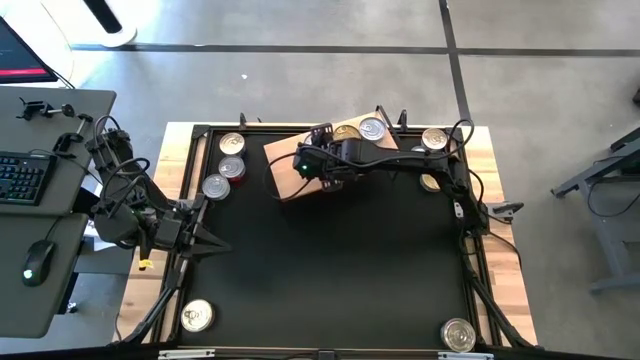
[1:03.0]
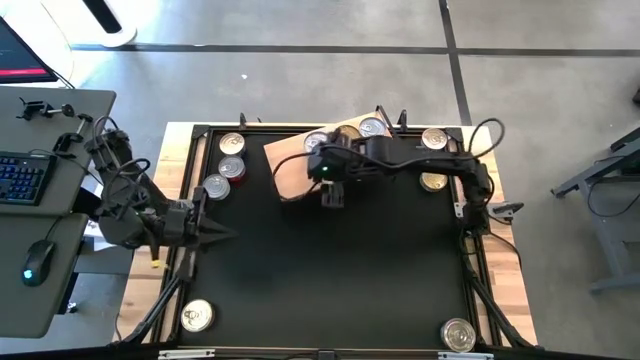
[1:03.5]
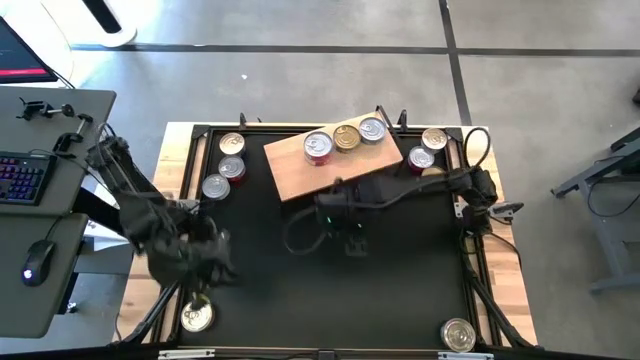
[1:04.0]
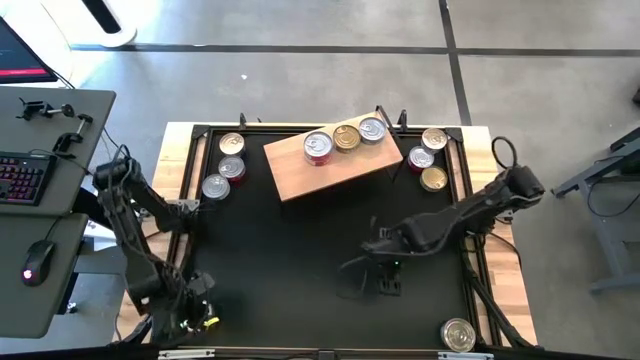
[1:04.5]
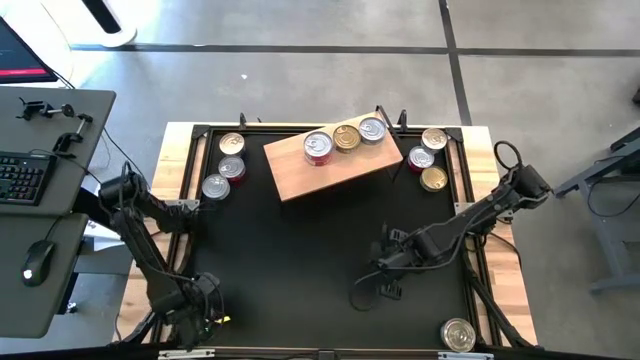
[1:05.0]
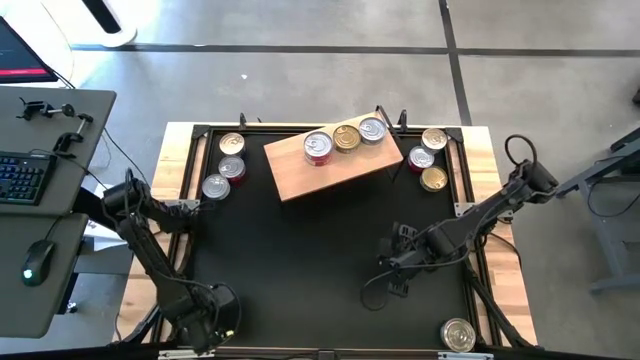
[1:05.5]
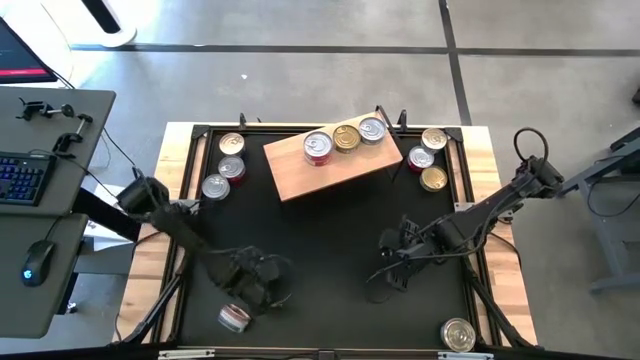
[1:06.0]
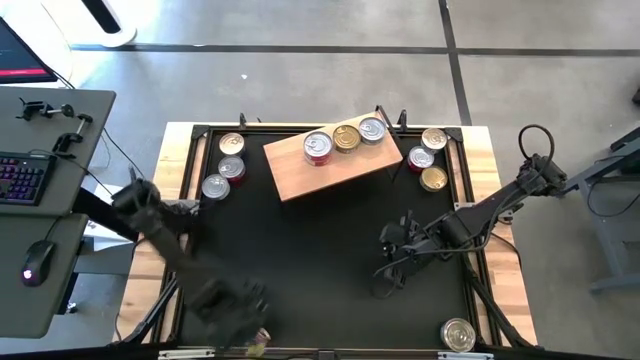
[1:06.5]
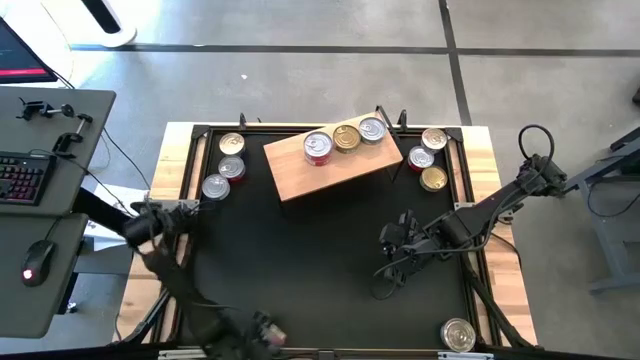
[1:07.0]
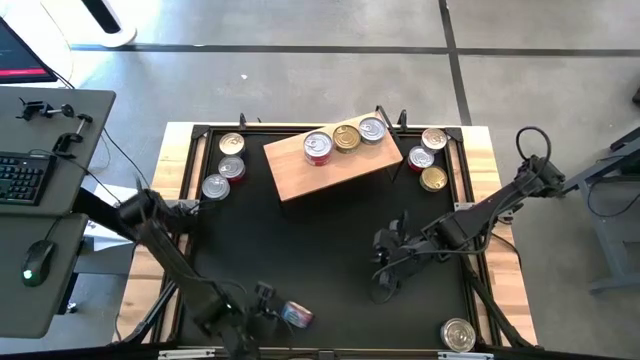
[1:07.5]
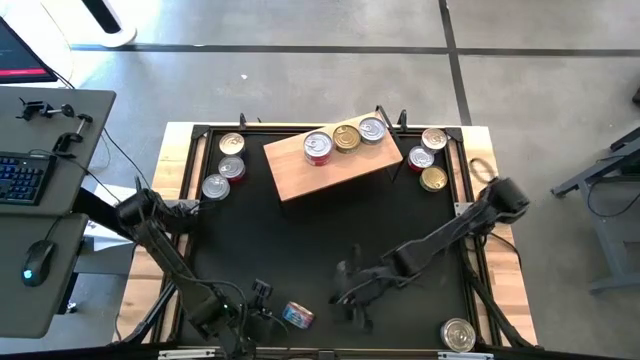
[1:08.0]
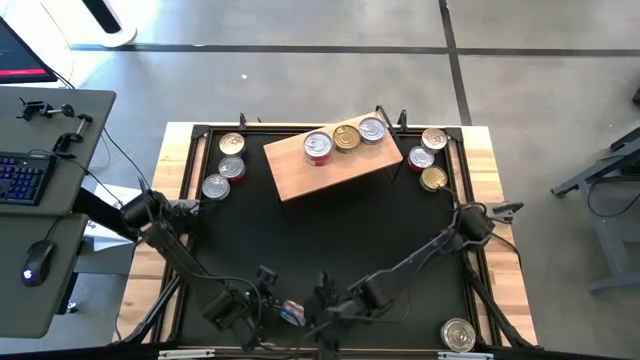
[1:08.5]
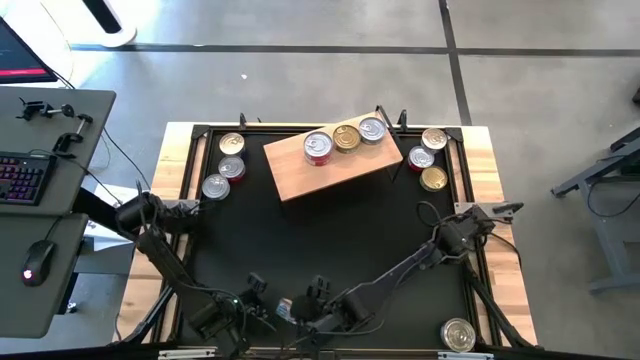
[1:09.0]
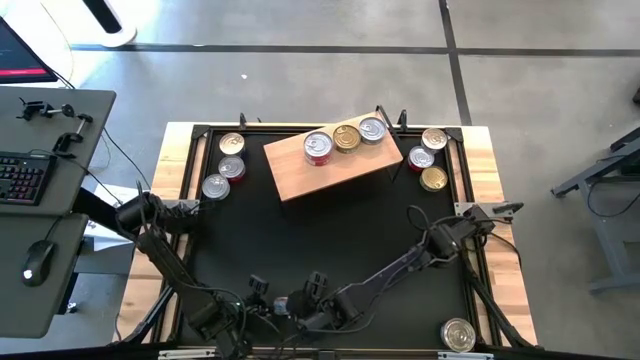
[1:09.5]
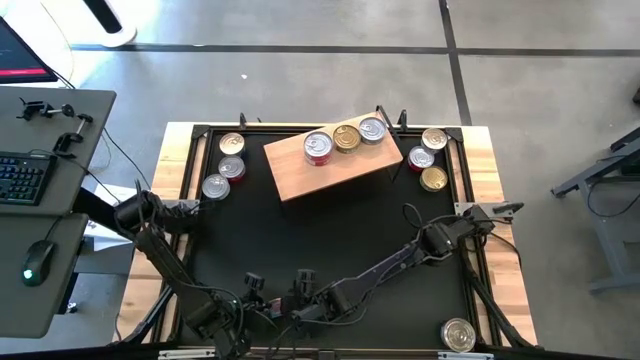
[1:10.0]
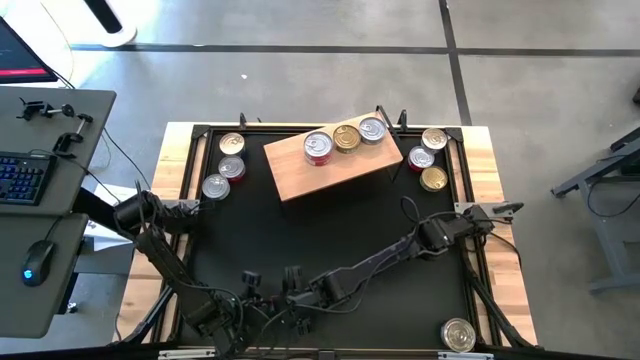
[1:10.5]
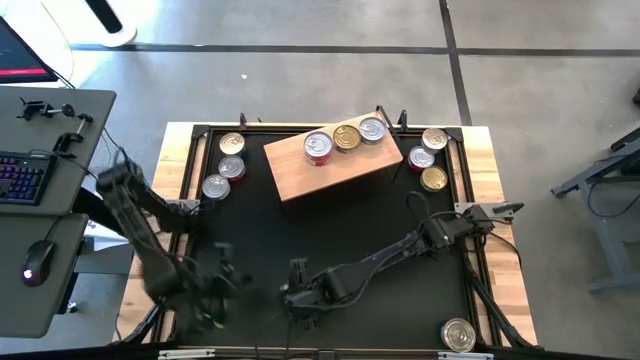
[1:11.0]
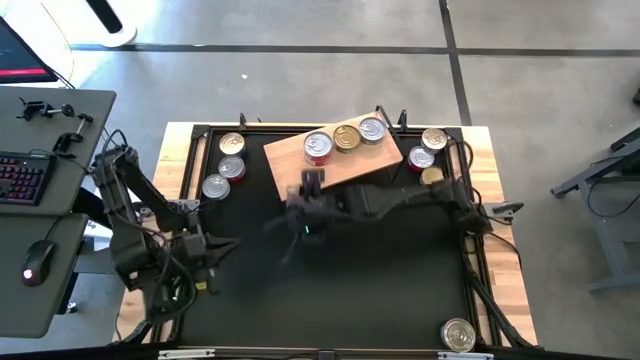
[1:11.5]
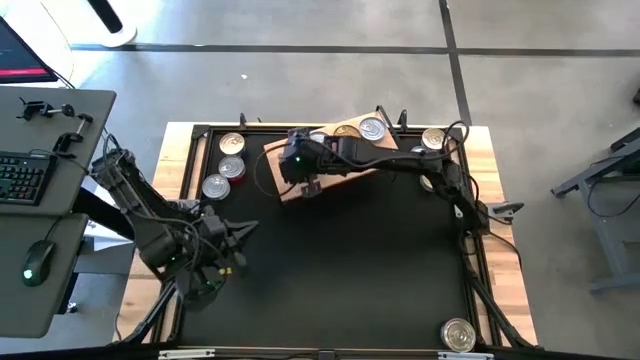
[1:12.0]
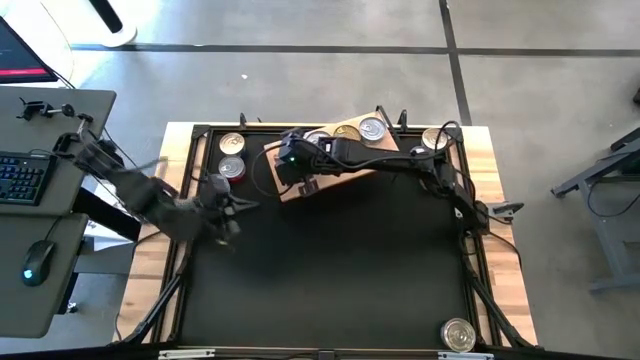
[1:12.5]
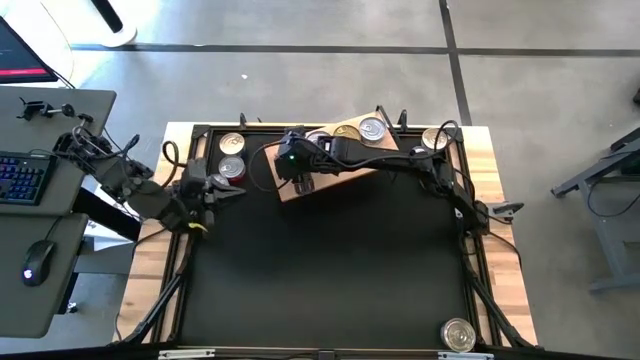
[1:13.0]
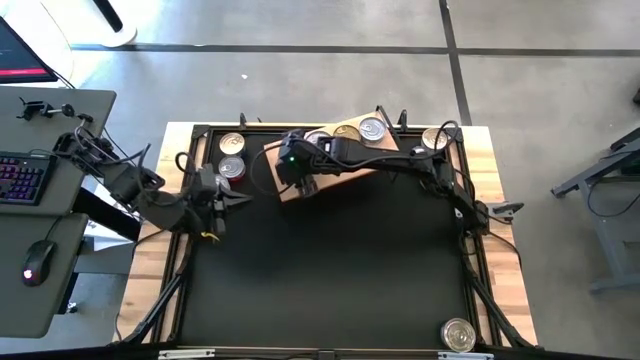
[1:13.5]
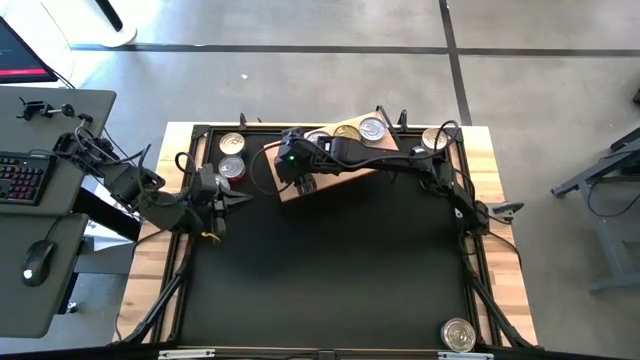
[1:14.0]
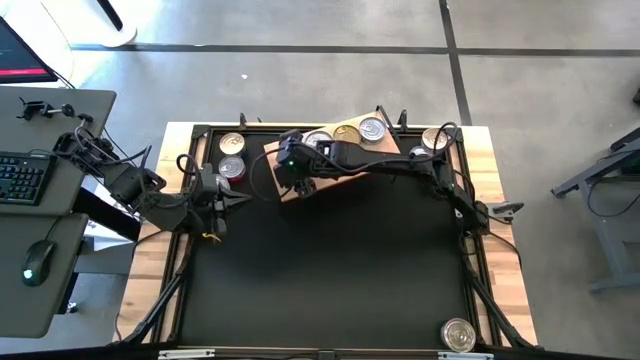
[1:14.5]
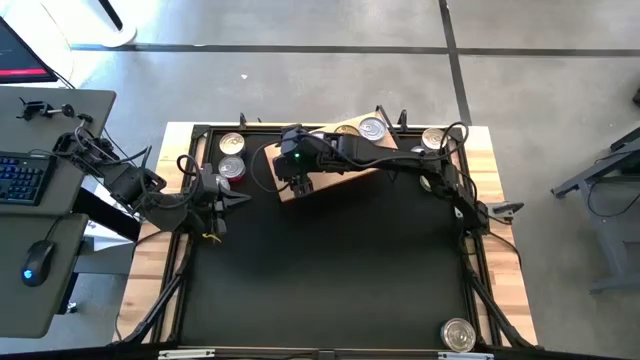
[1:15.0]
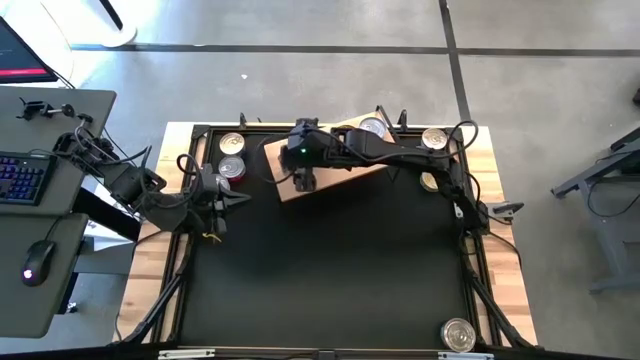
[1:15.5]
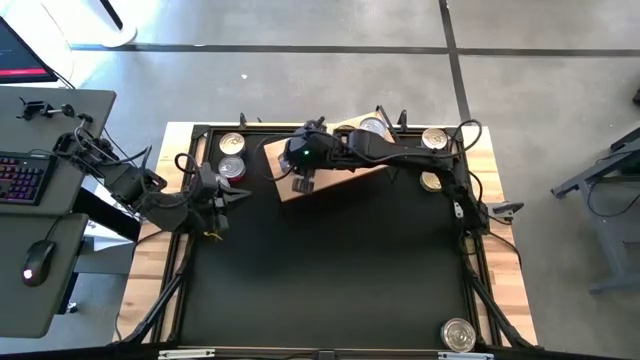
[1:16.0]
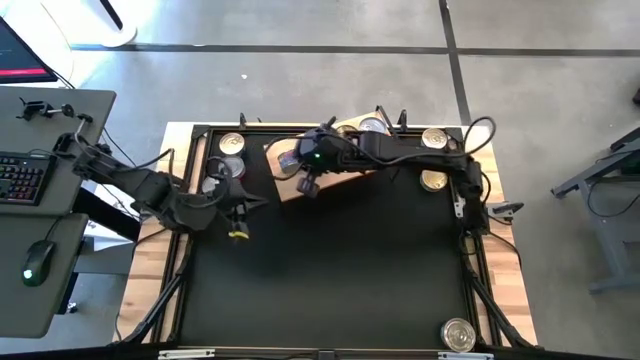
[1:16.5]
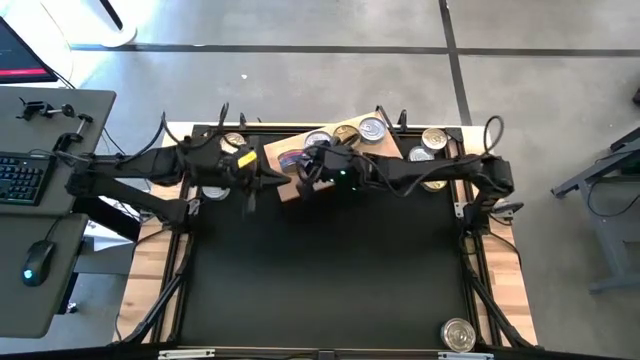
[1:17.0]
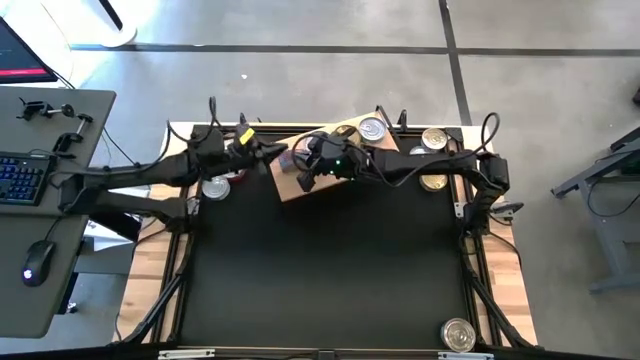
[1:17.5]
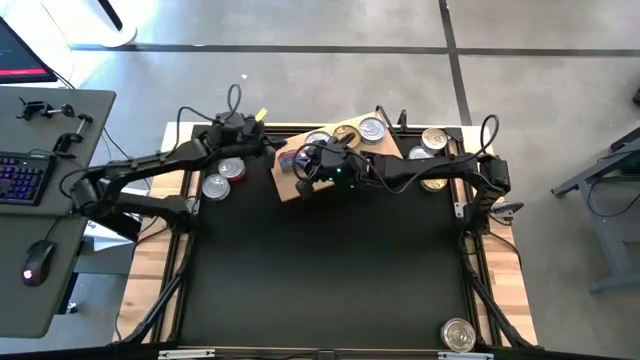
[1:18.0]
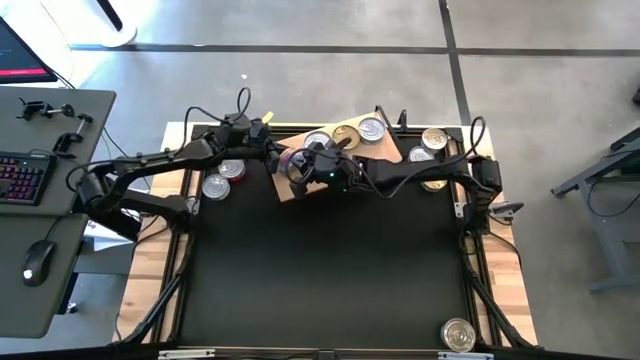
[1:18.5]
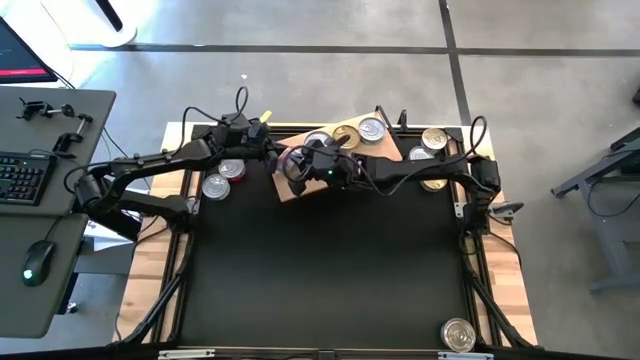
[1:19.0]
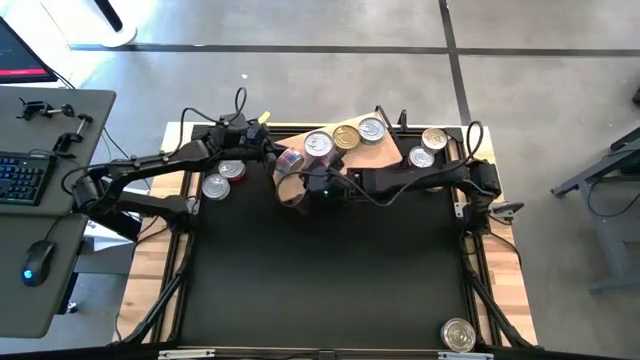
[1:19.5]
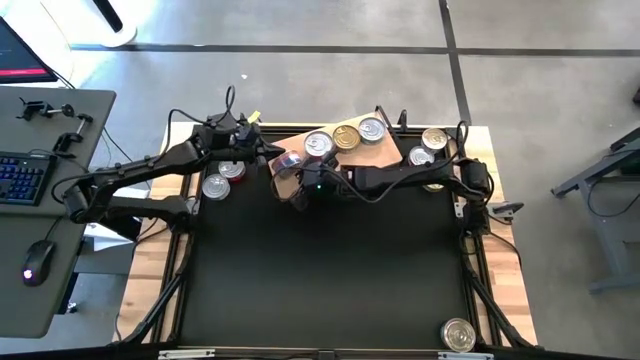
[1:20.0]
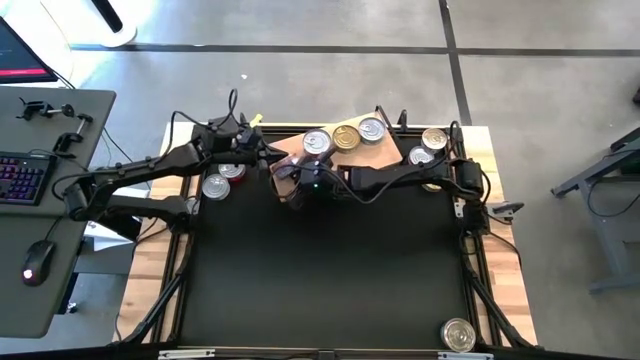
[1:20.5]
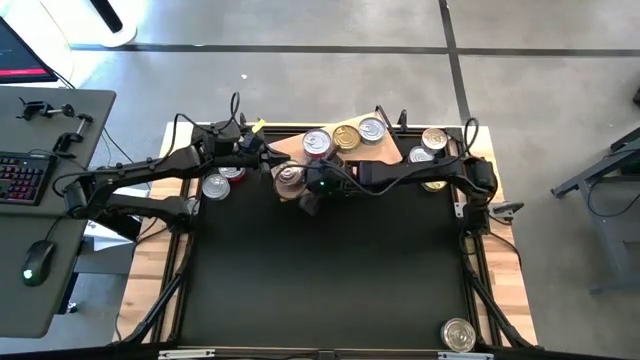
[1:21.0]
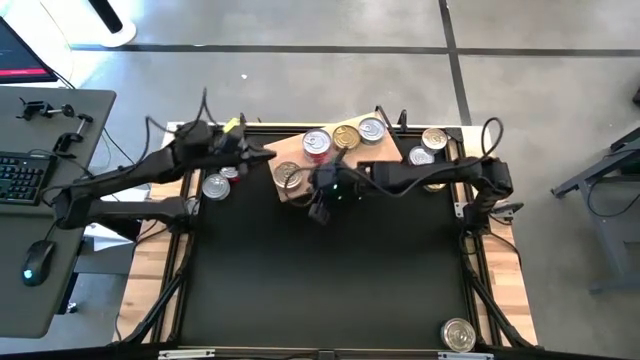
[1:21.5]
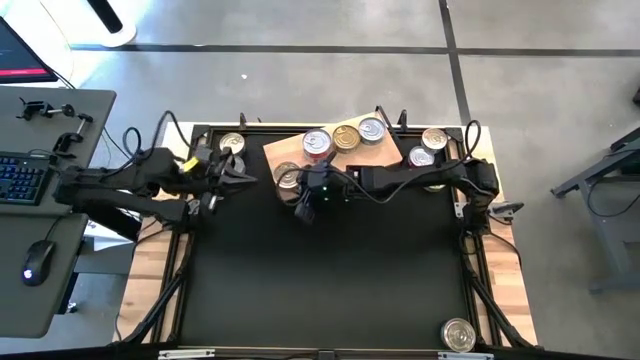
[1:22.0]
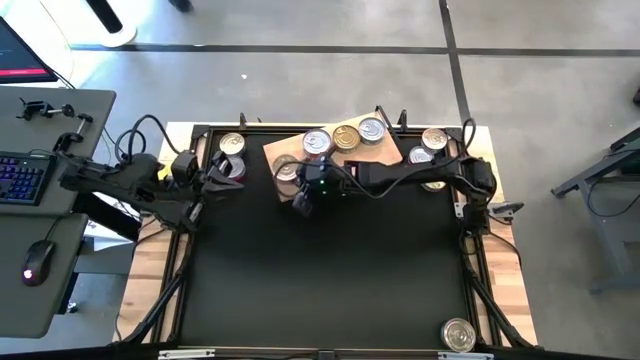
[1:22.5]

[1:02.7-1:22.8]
Task: Stack canned seafood by type on shelf
Put the bottom left blue and red tuna can on the shelf

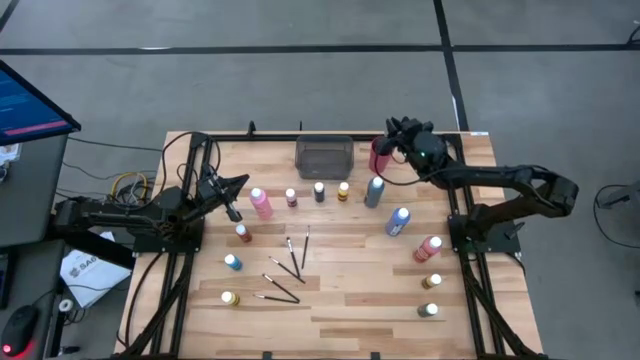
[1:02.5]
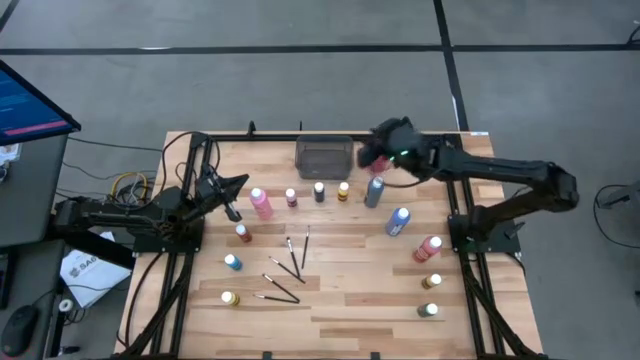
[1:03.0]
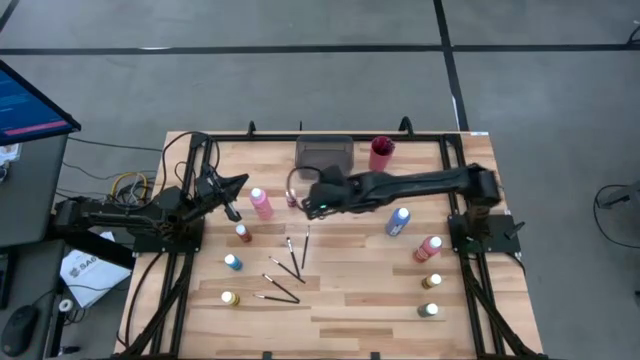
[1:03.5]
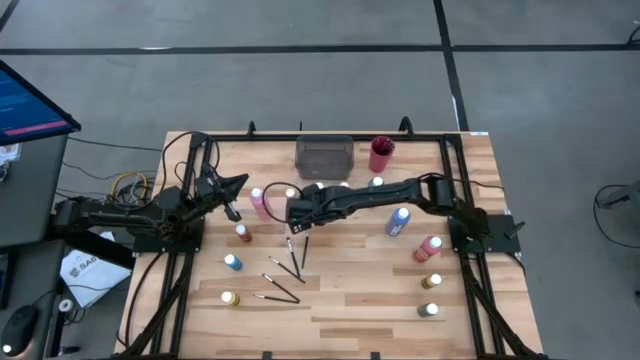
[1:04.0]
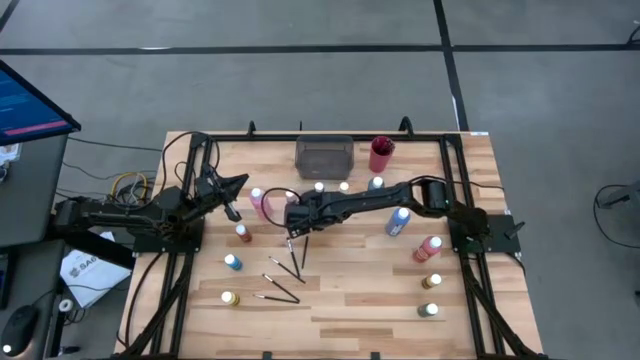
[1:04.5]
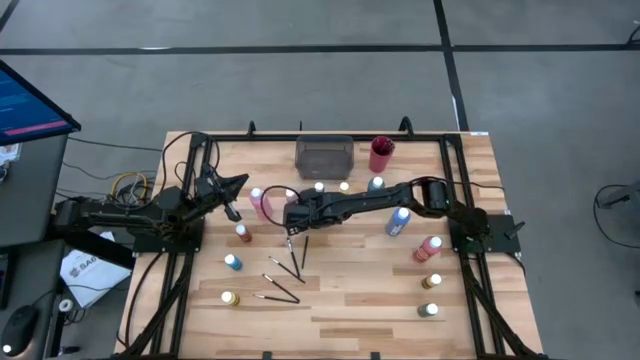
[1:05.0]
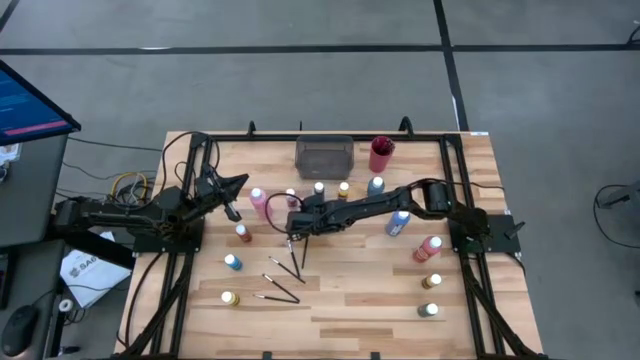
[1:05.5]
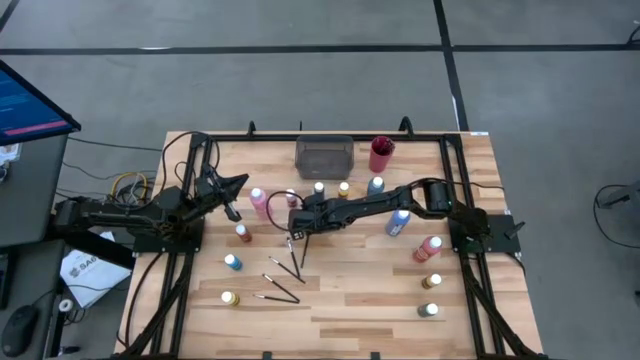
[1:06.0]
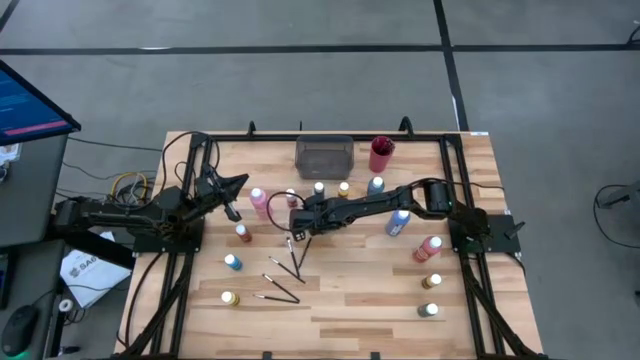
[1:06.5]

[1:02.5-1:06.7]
Task: Pick & Place Paint Supplies
Put the black paintbrush into the red cup
